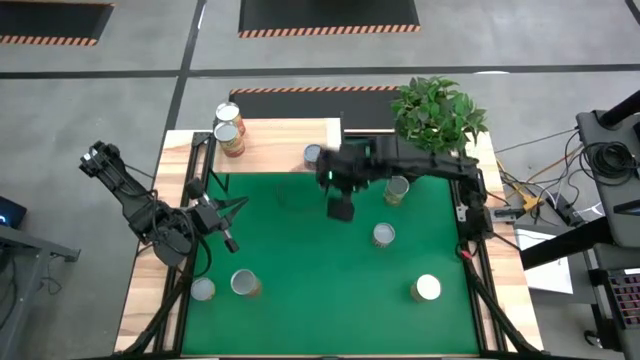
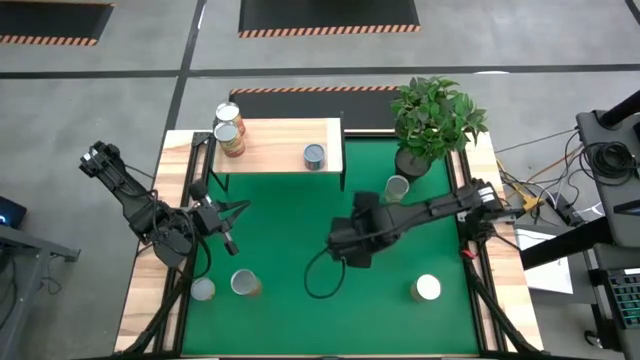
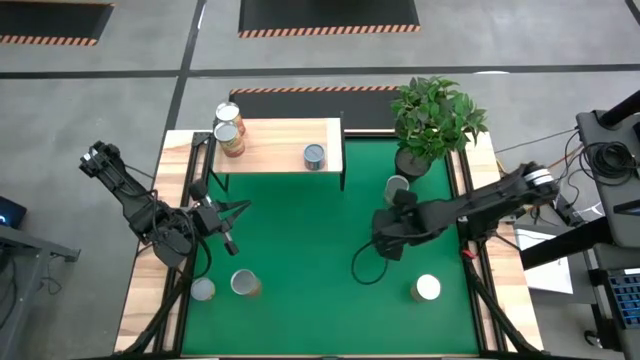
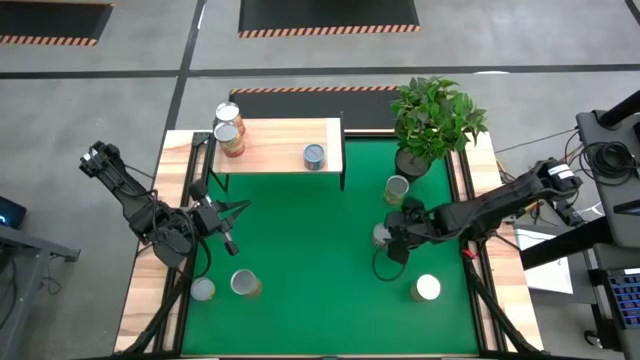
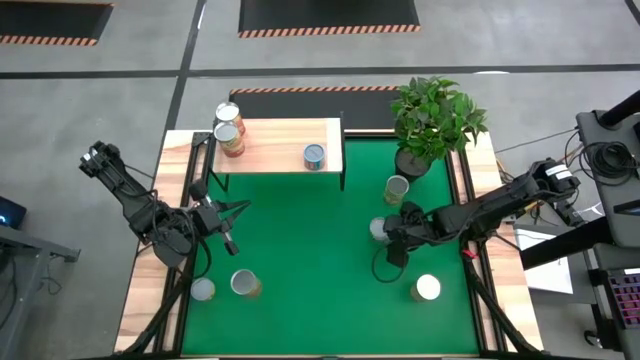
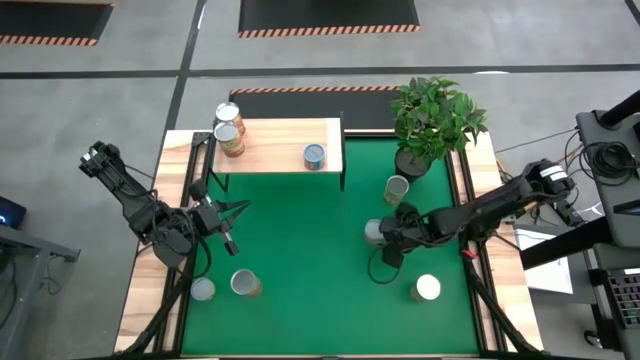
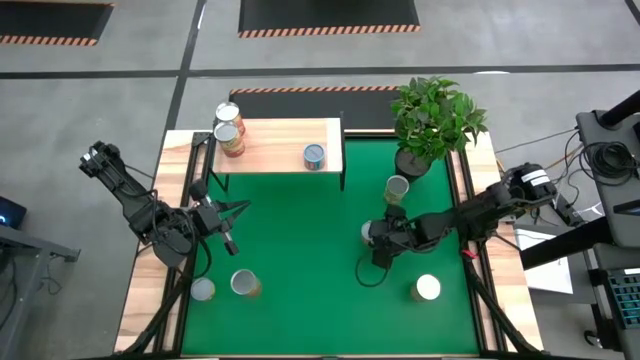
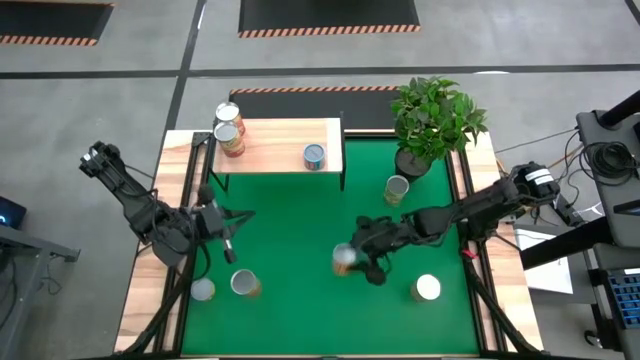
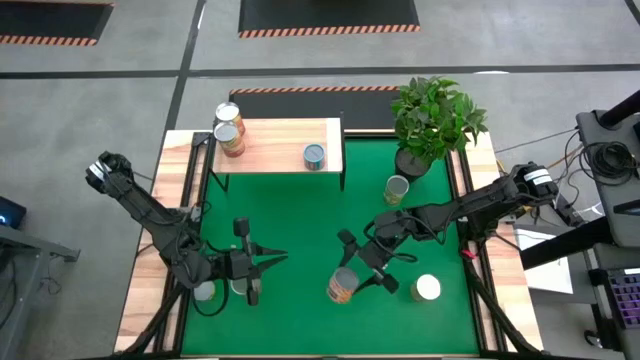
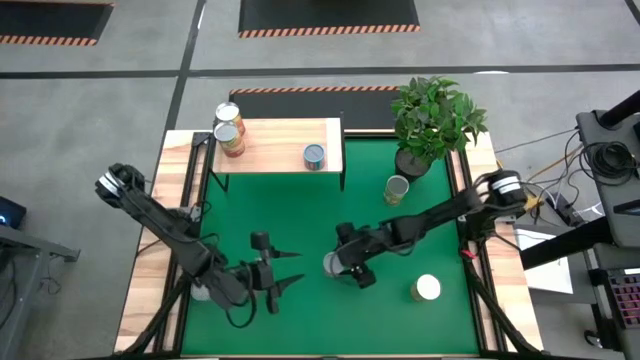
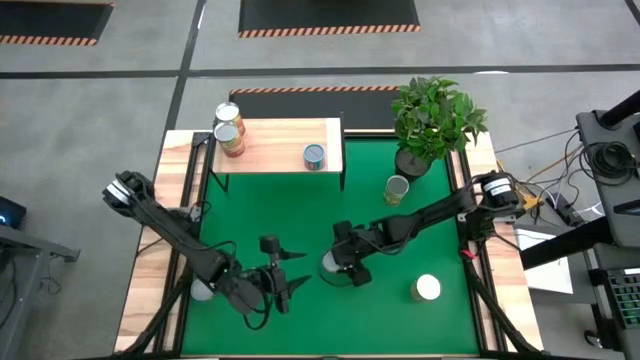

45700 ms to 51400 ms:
Task: Pick and place cans onto a shelf
Move the yellow can to the center of the table

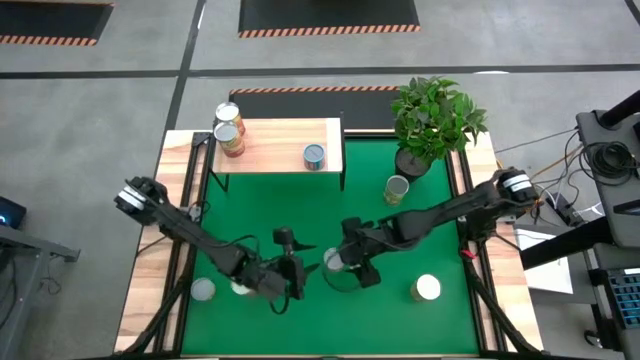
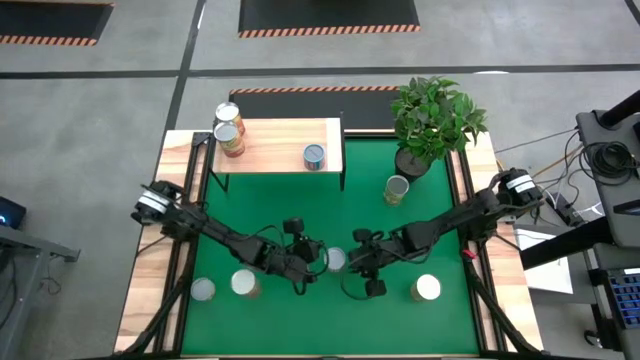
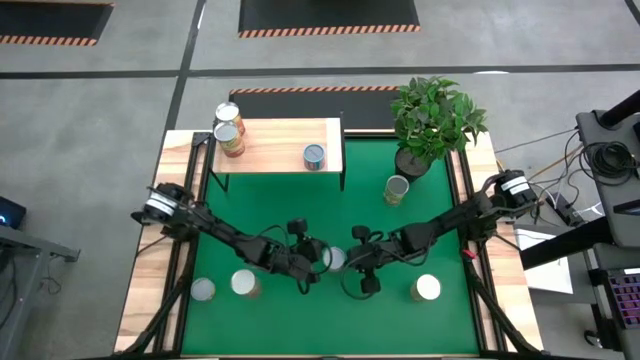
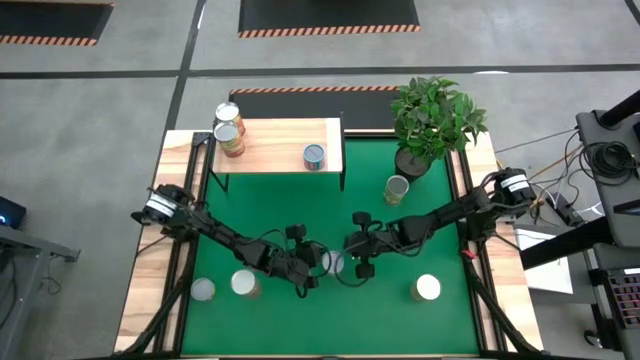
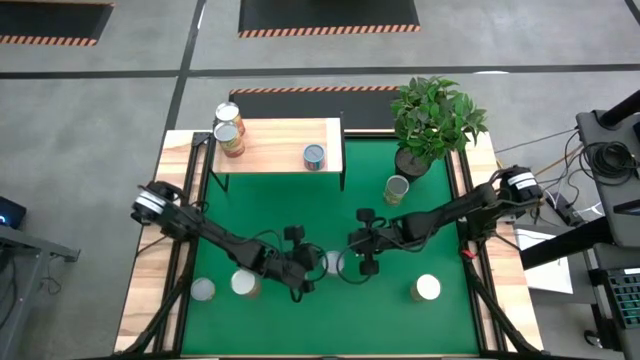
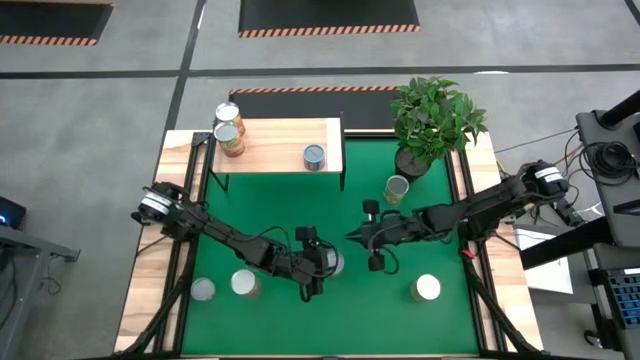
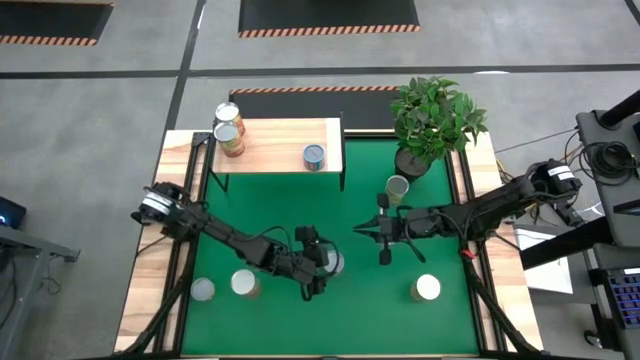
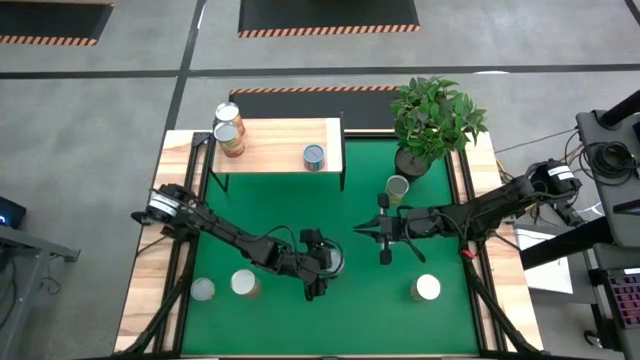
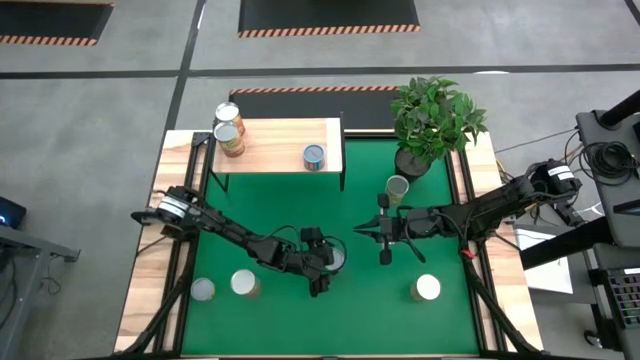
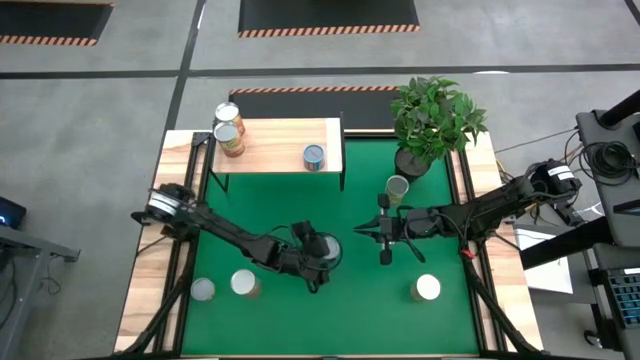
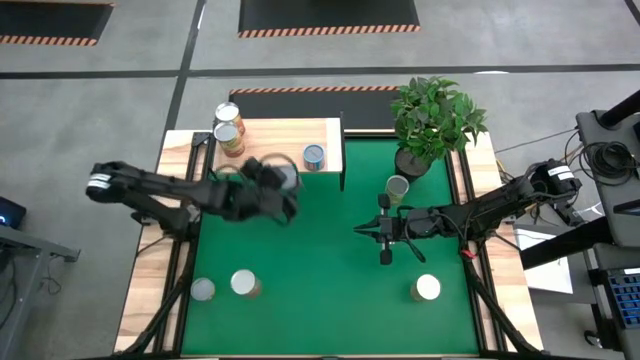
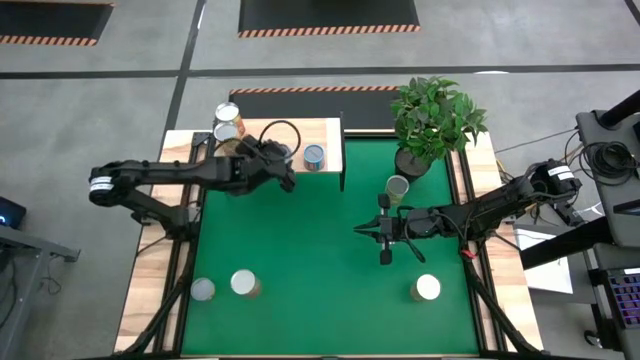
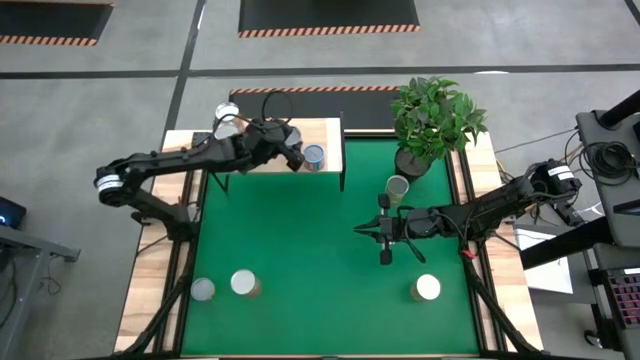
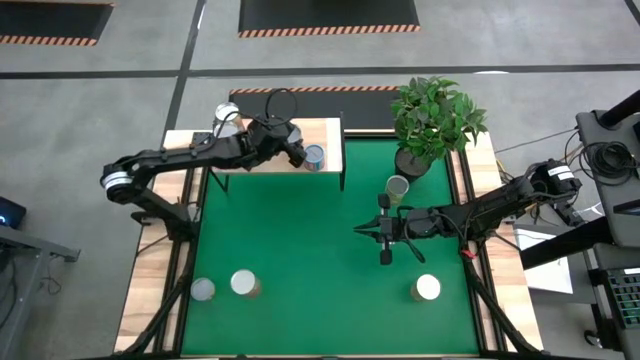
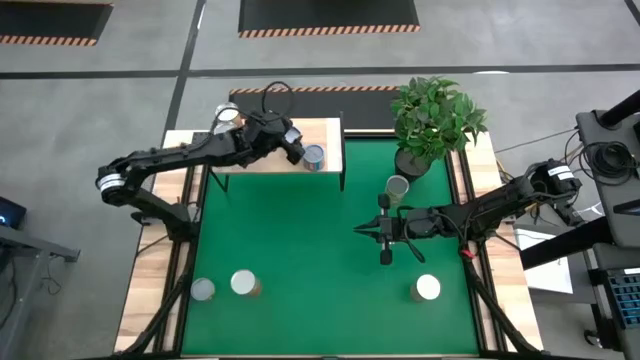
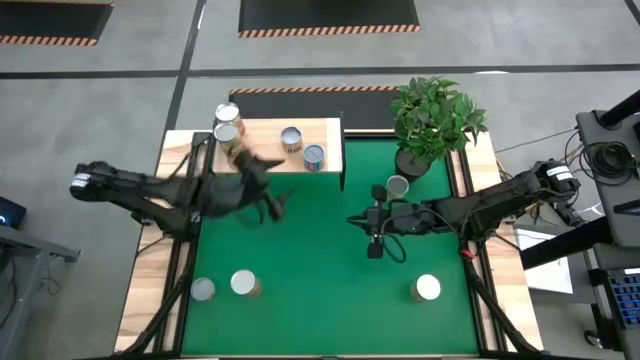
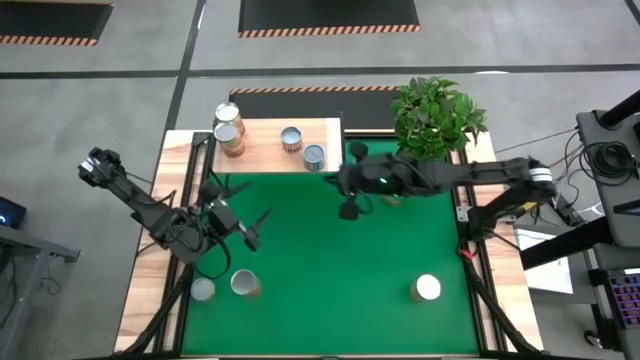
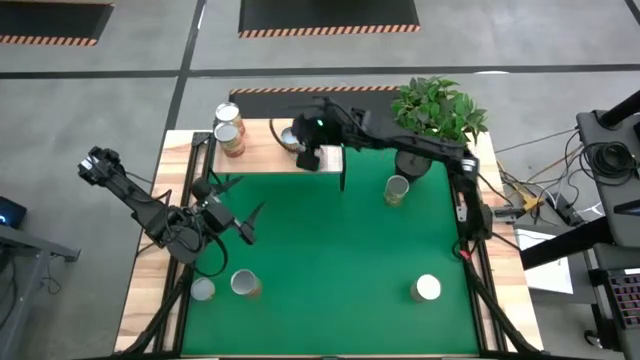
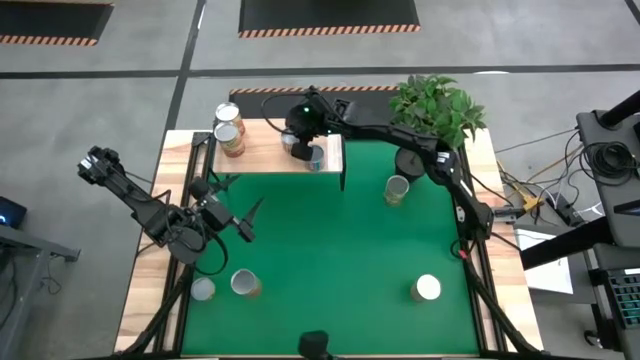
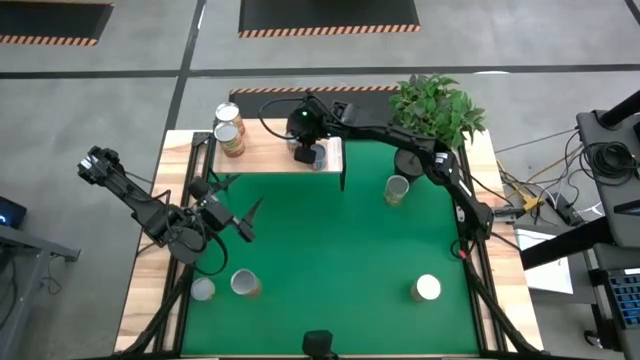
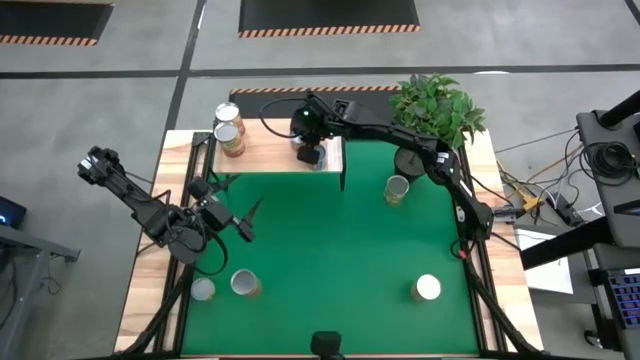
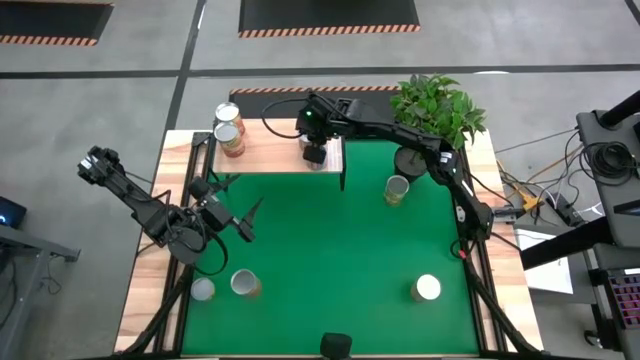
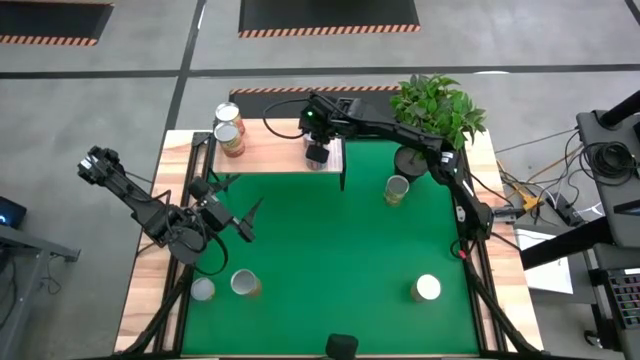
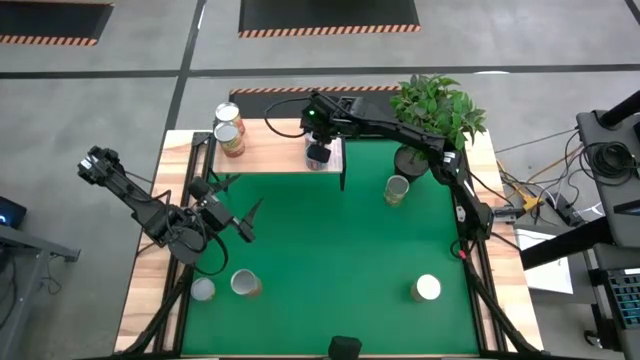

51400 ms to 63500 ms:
Put the yellow can on the shelf aligned with the pink can

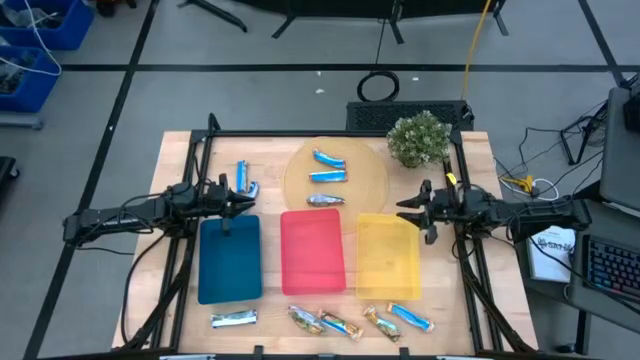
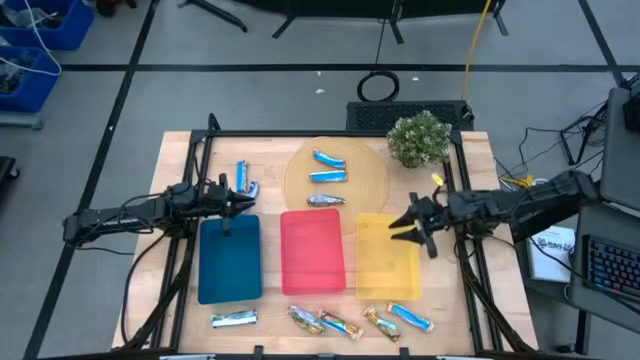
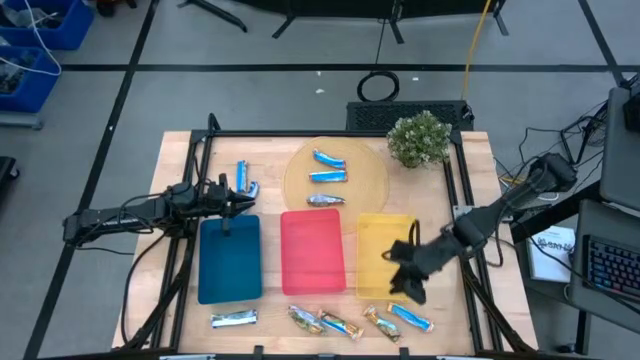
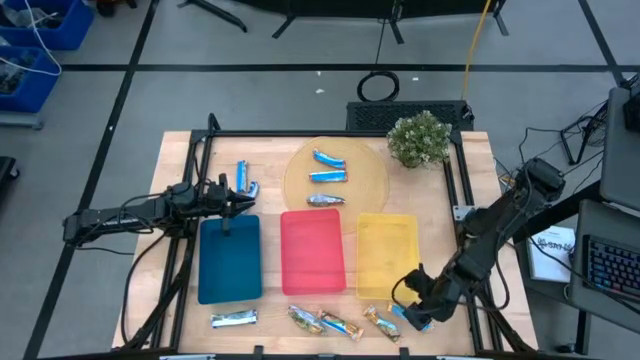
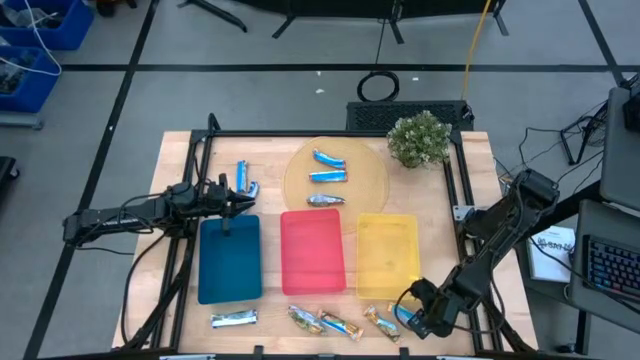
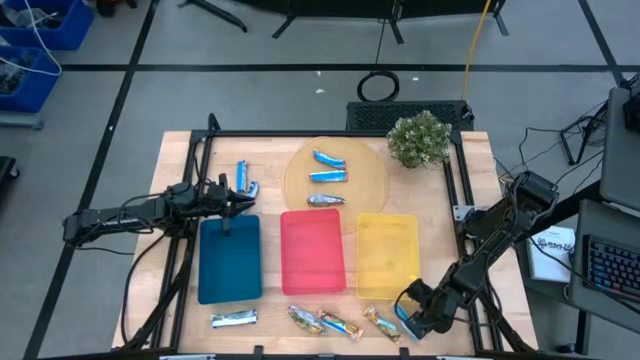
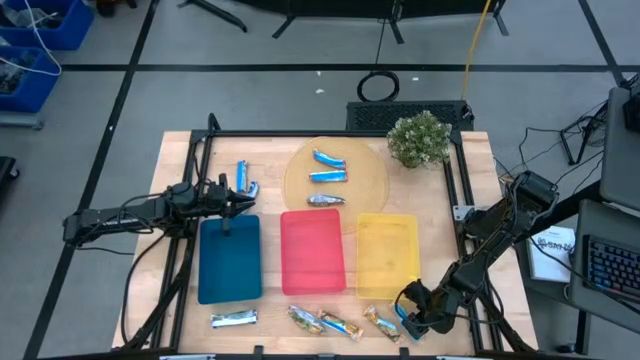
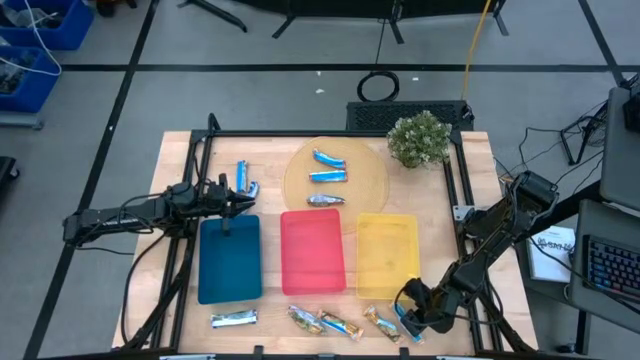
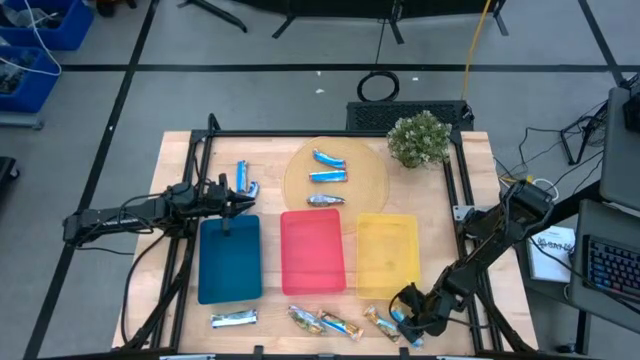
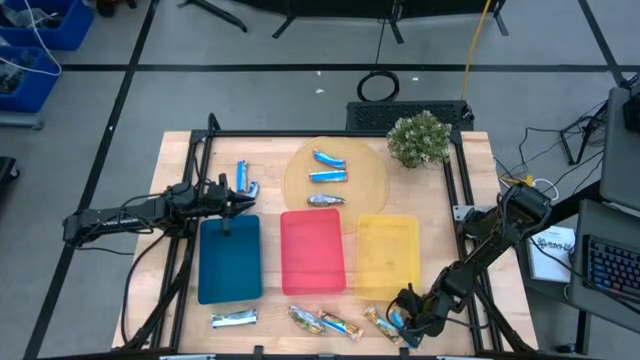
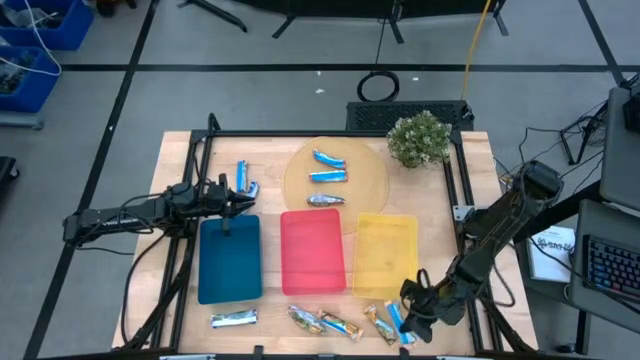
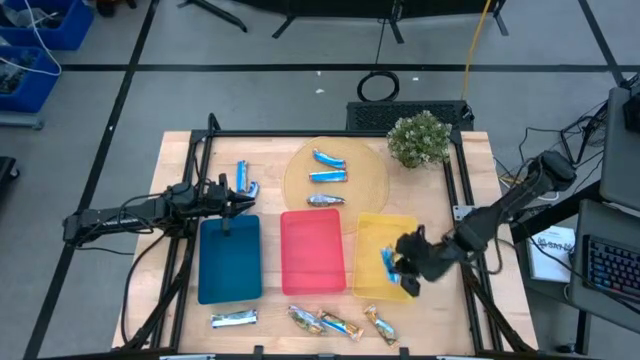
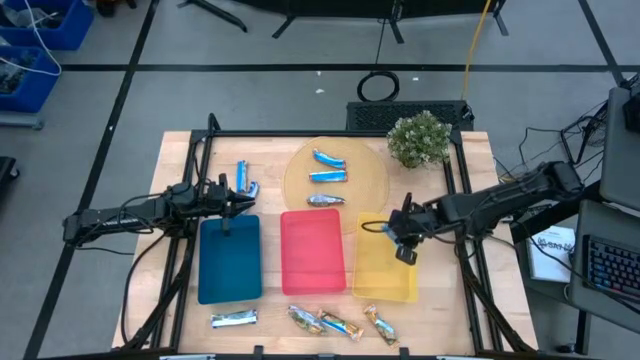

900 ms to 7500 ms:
Task: Pick and place Granola Bars by type
Put the right yellow granola bar into the yellow bin
